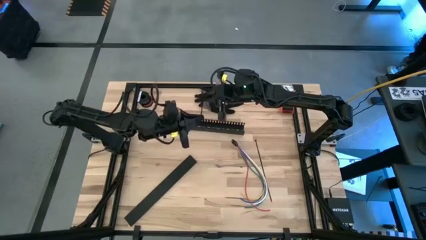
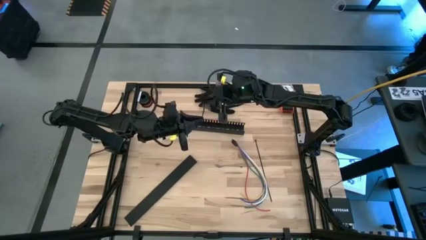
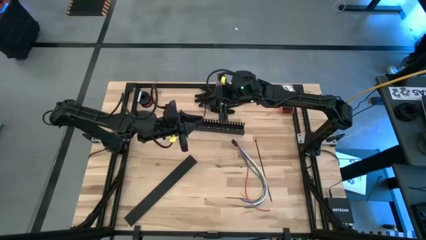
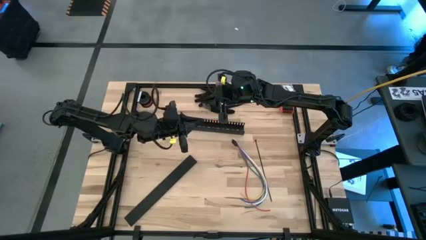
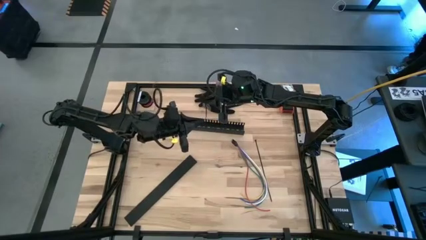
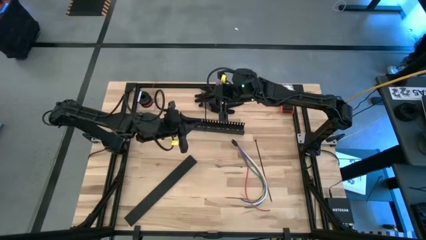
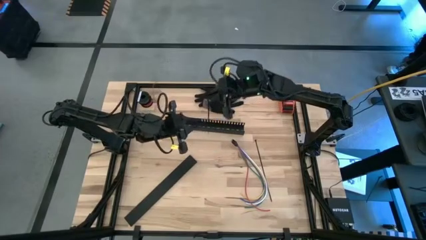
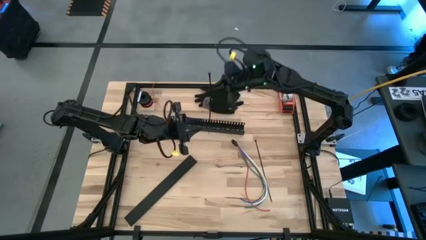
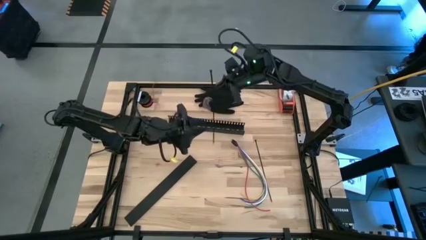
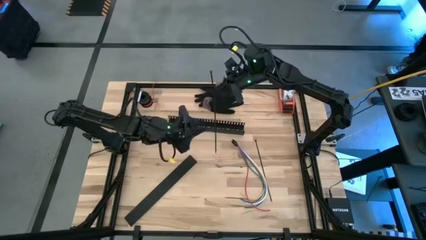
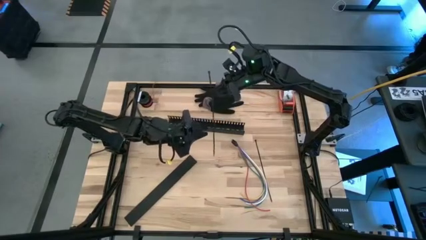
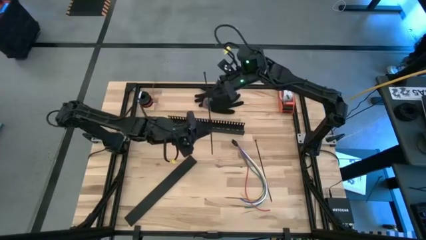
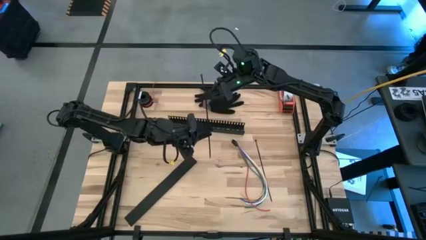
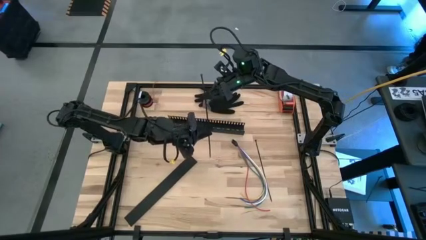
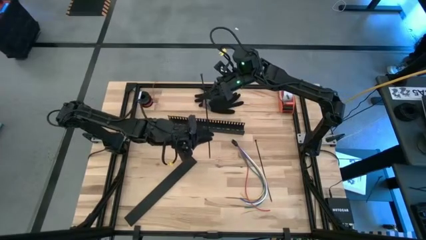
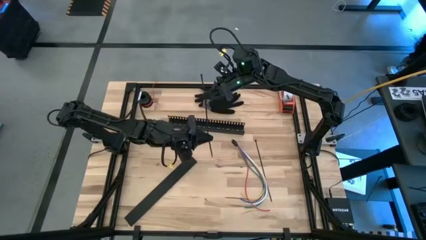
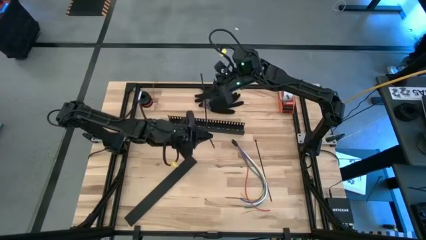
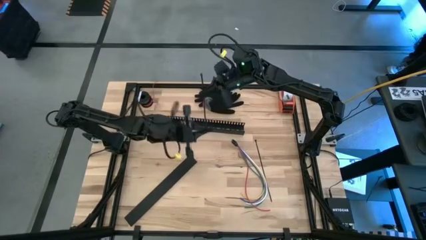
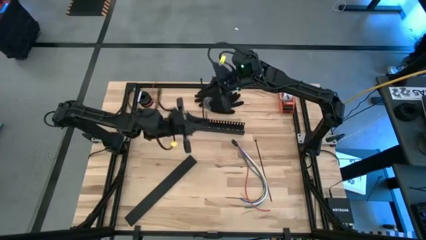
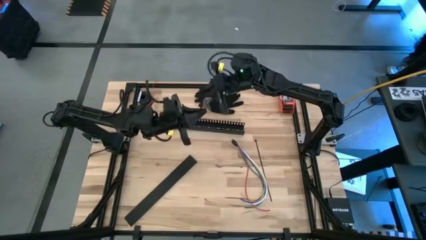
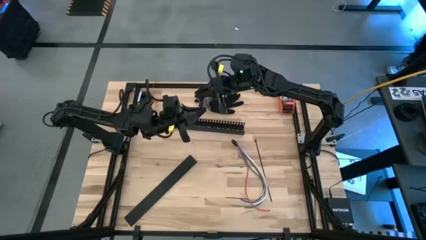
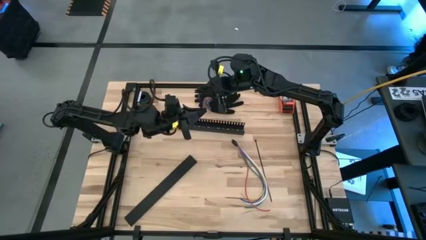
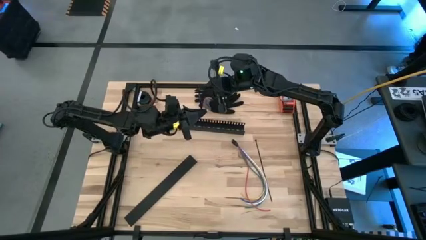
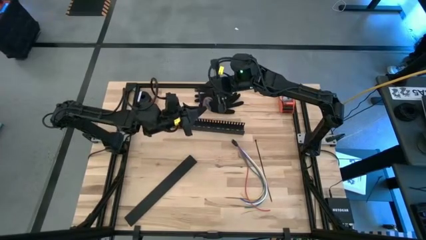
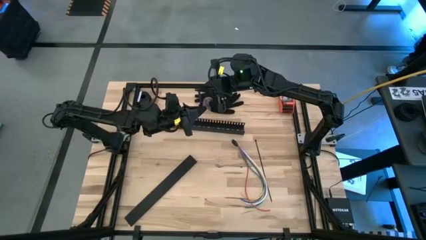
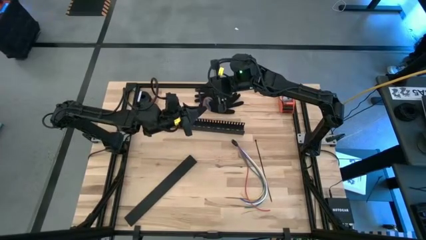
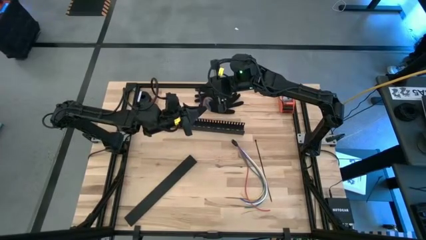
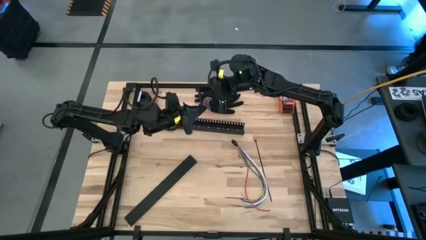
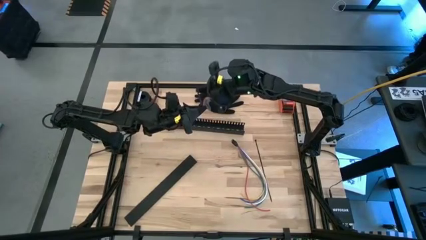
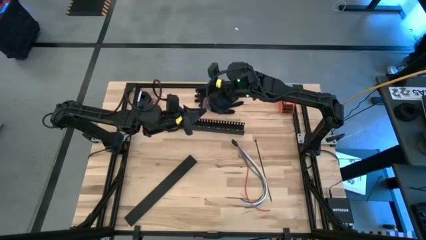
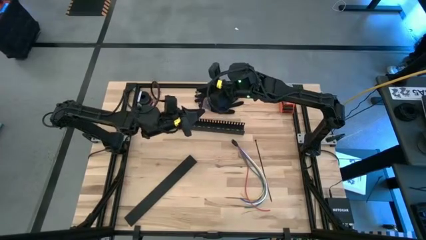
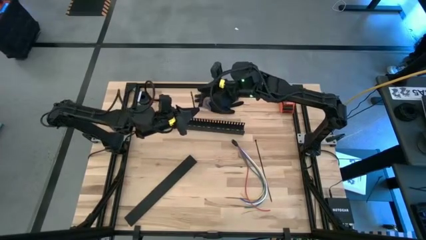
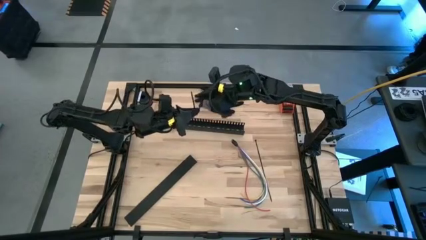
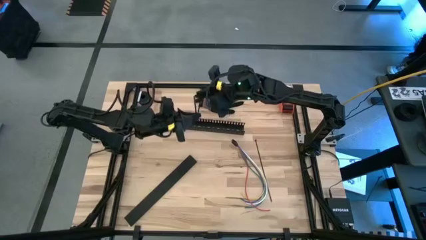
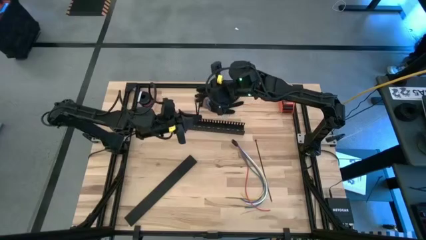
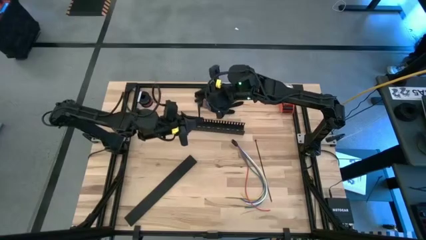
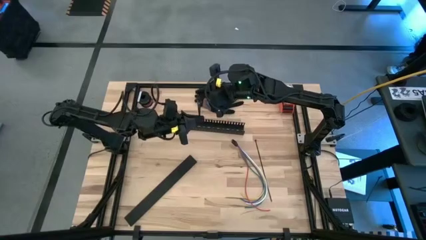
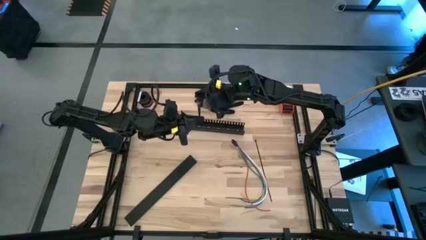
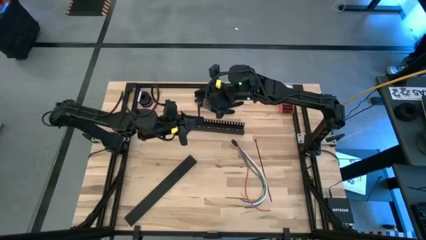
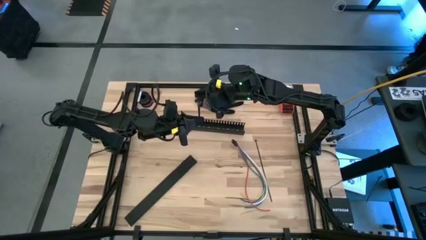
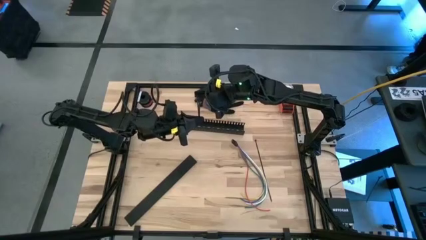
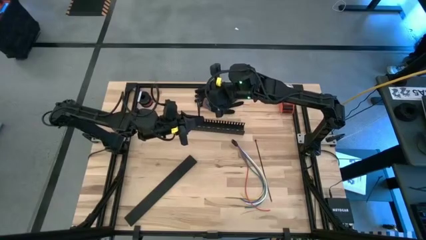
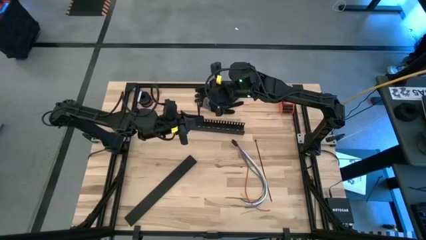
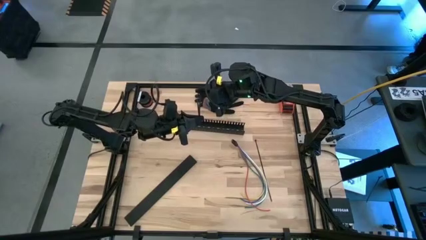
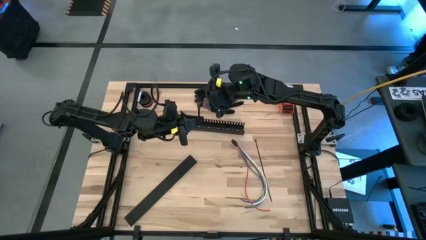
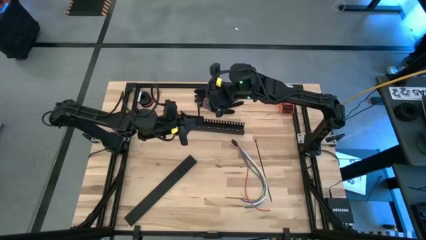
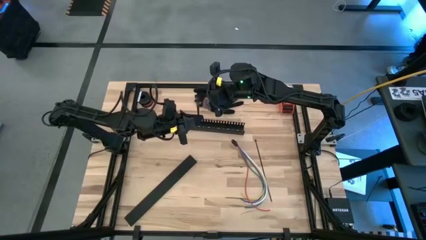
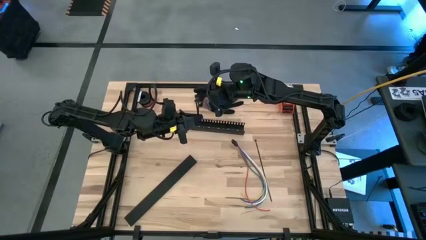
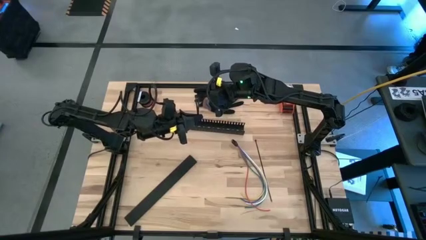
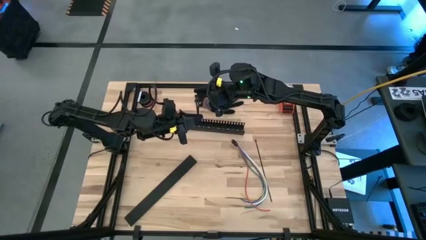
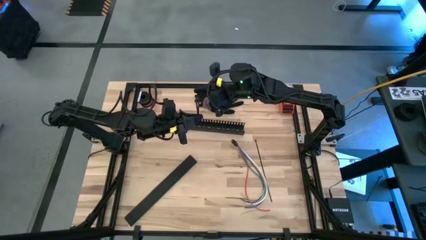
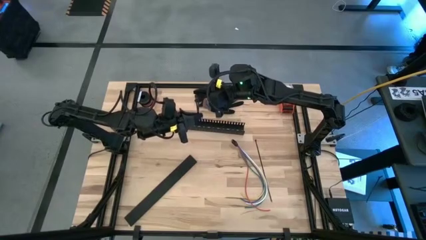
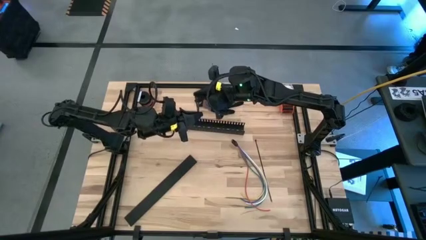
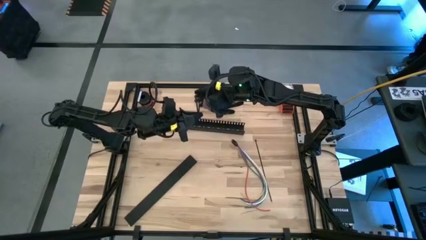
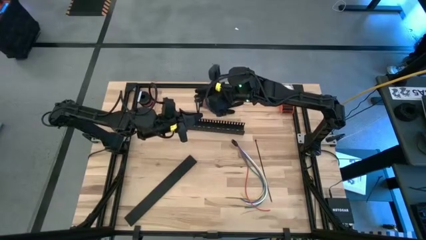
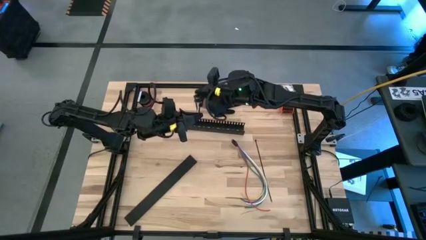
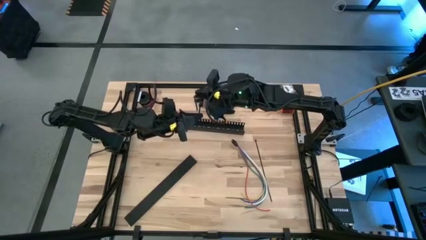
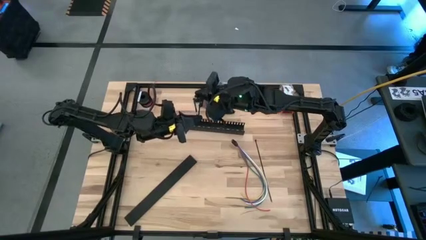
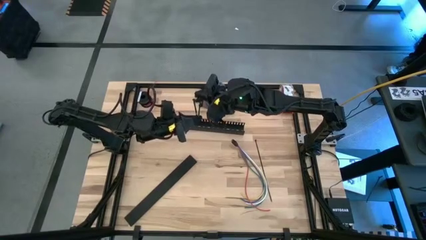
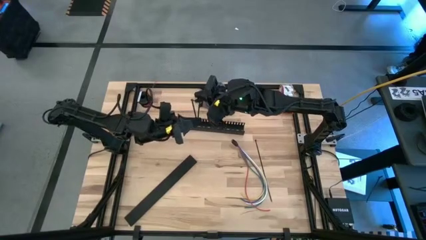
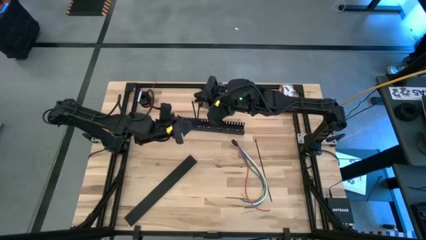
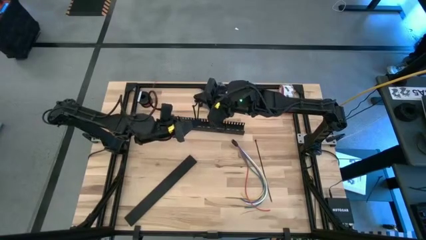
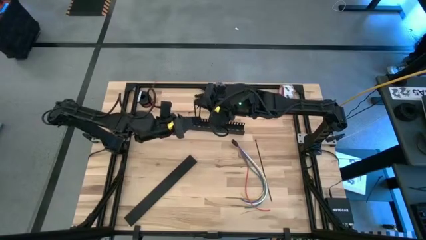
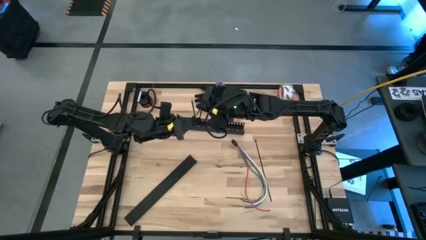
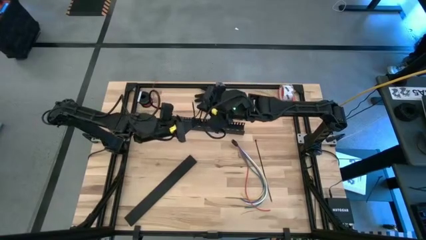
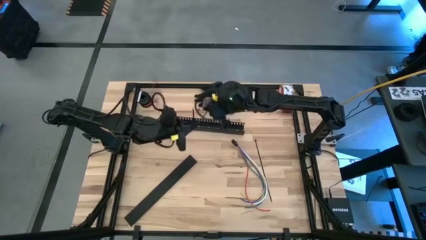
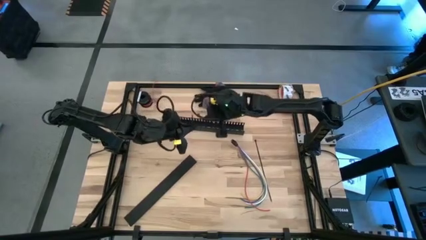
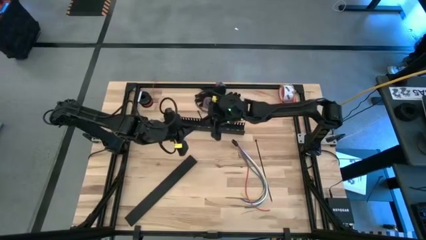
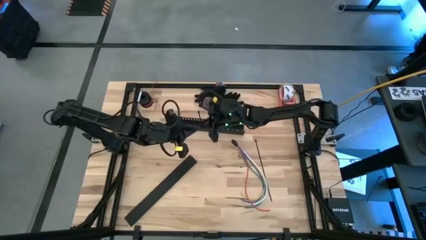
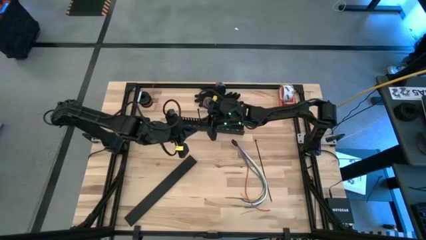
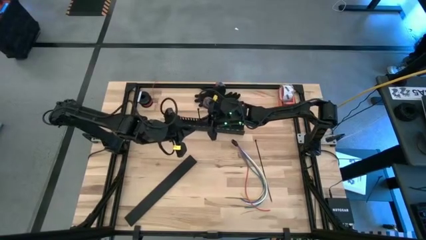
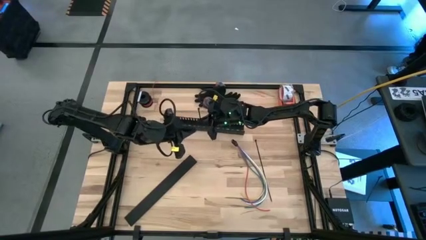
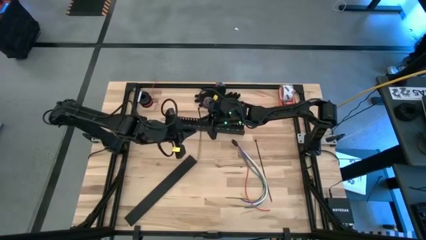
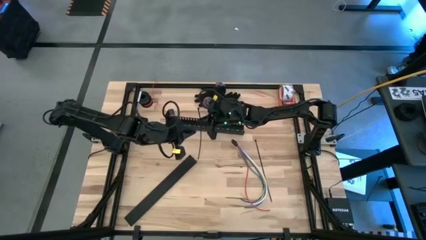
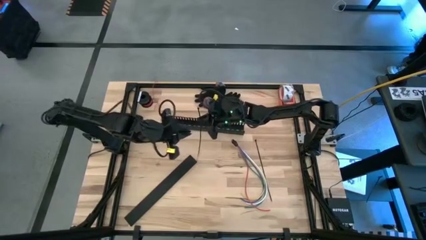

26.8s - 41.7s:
Task: Ziptie cables
Prepare the black zip tie
